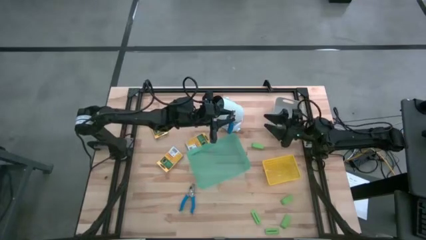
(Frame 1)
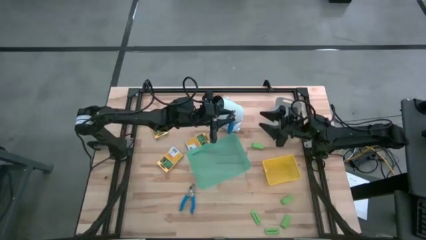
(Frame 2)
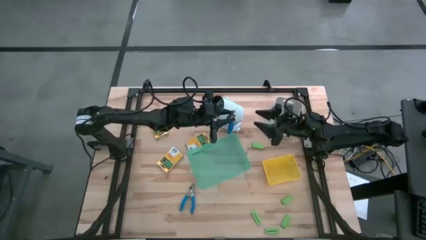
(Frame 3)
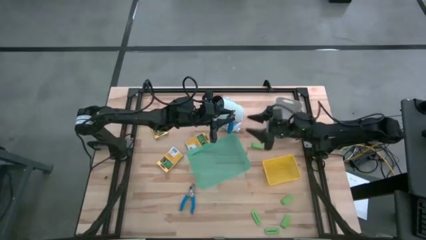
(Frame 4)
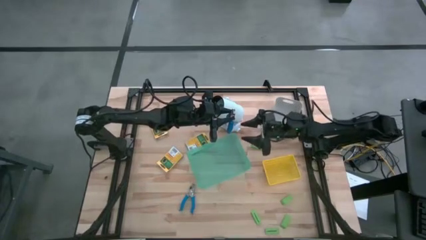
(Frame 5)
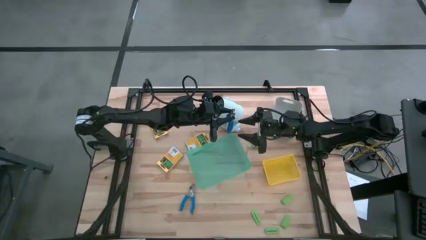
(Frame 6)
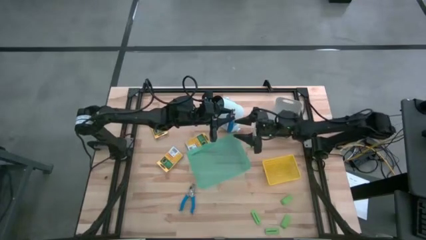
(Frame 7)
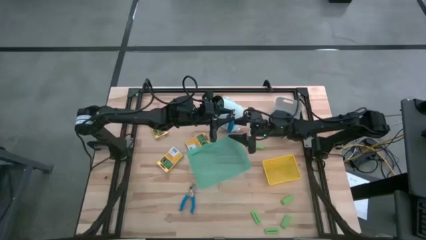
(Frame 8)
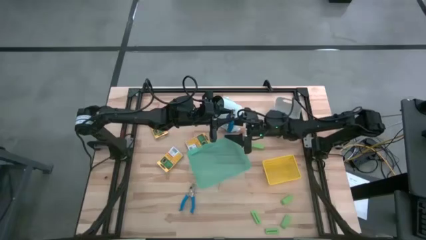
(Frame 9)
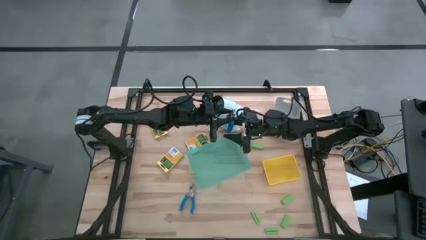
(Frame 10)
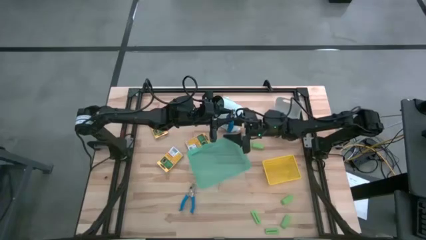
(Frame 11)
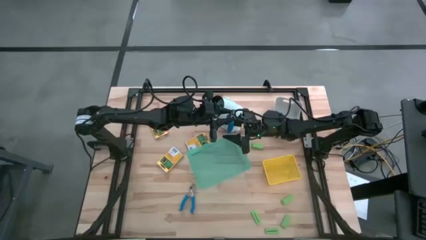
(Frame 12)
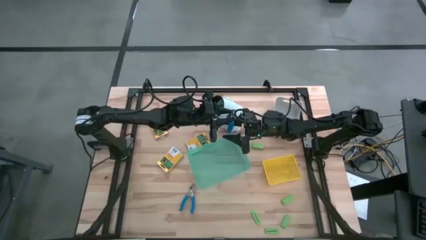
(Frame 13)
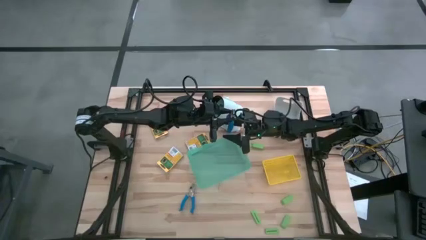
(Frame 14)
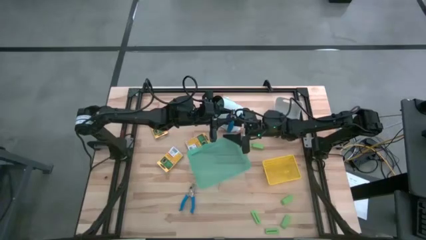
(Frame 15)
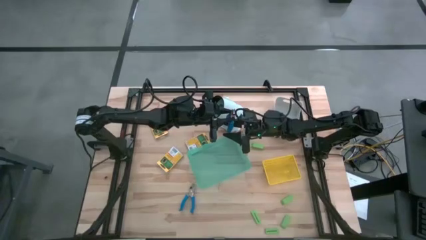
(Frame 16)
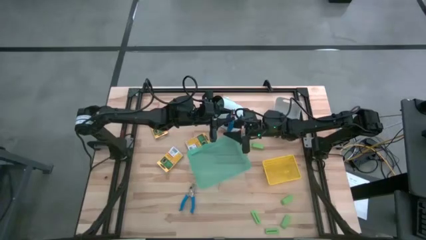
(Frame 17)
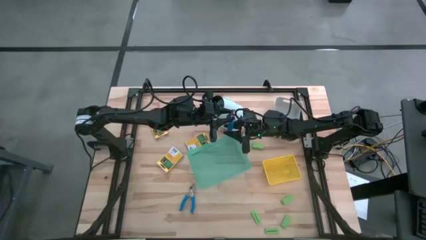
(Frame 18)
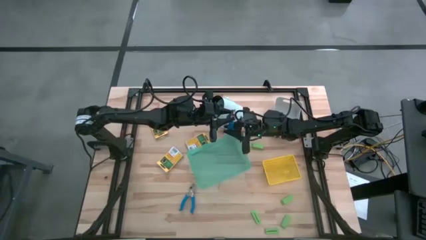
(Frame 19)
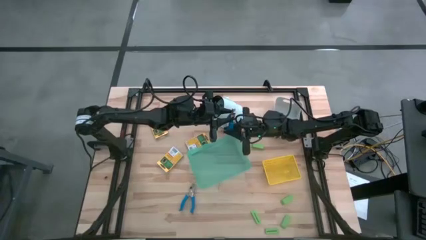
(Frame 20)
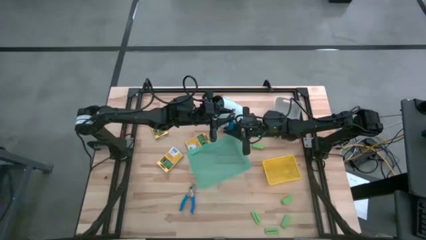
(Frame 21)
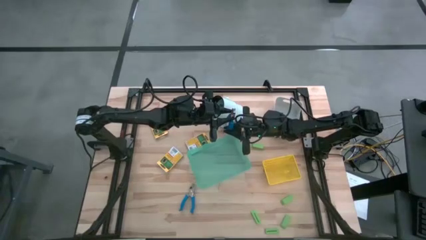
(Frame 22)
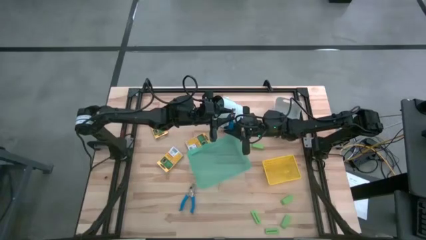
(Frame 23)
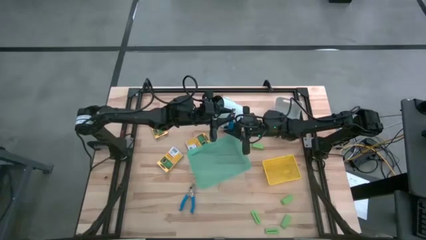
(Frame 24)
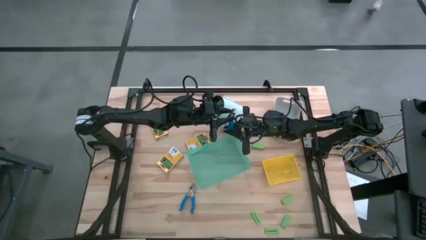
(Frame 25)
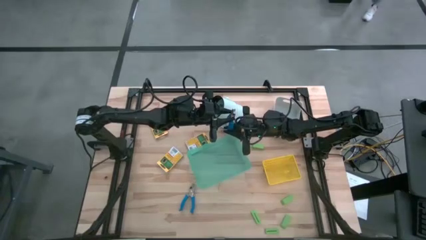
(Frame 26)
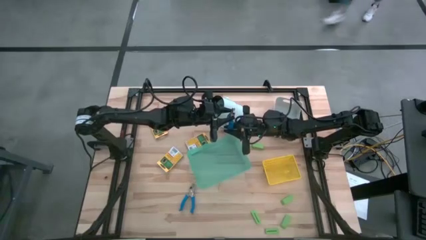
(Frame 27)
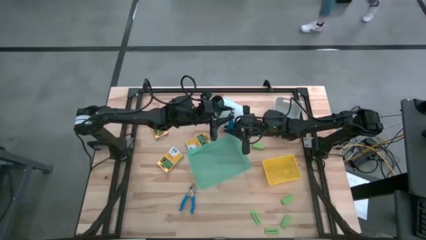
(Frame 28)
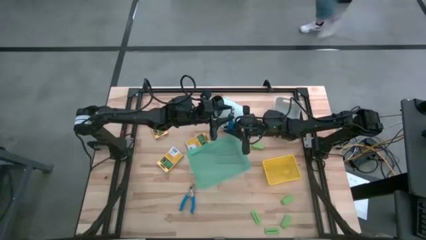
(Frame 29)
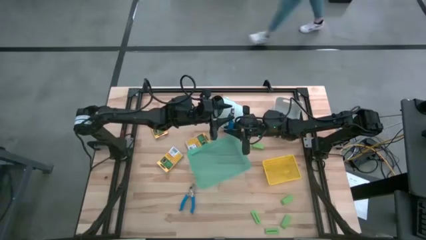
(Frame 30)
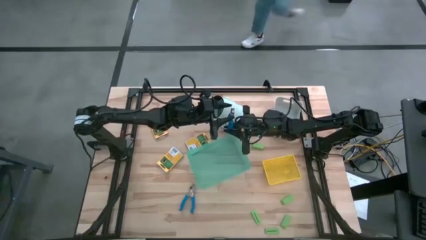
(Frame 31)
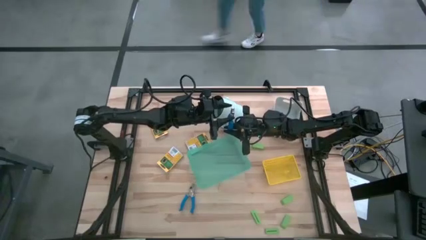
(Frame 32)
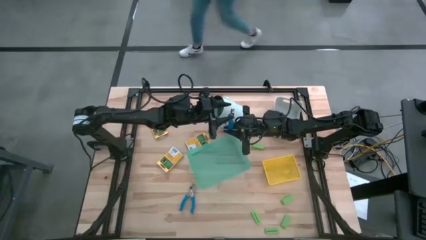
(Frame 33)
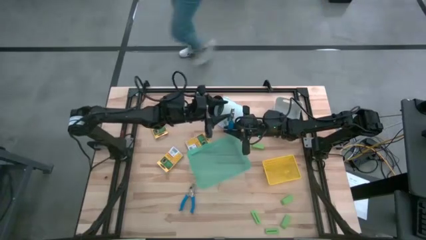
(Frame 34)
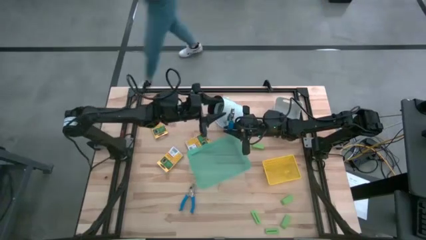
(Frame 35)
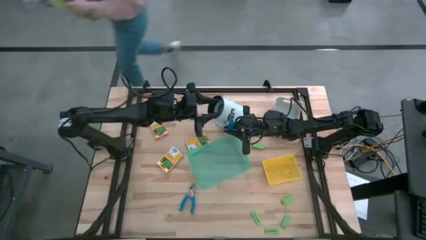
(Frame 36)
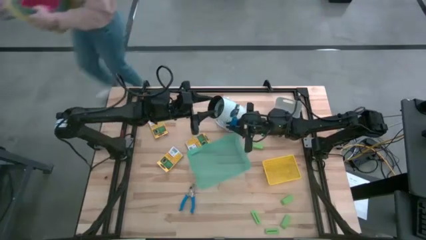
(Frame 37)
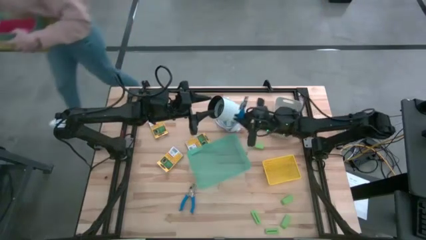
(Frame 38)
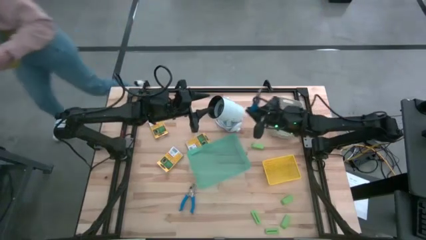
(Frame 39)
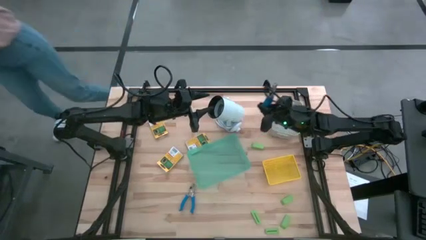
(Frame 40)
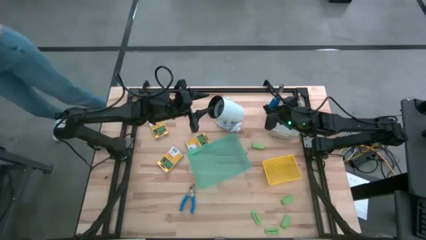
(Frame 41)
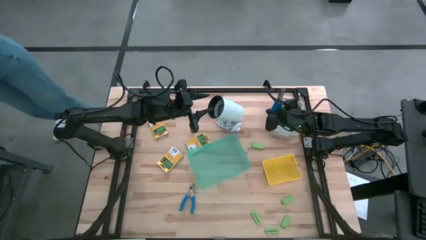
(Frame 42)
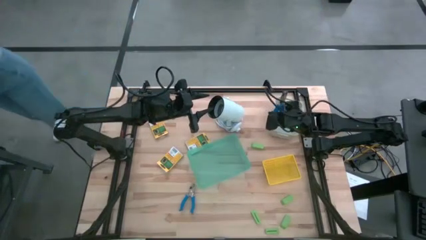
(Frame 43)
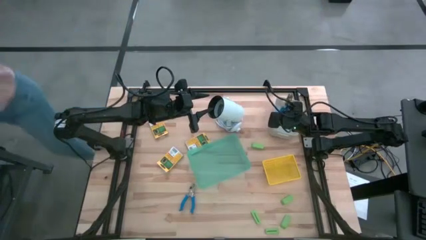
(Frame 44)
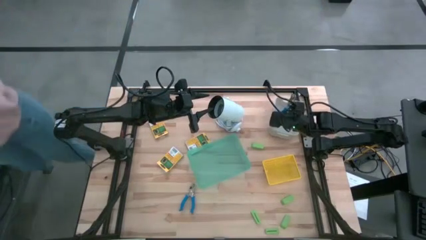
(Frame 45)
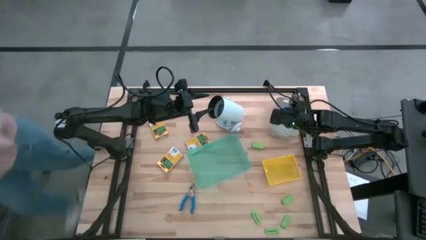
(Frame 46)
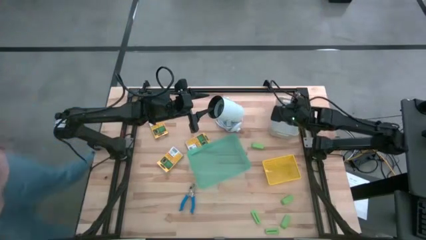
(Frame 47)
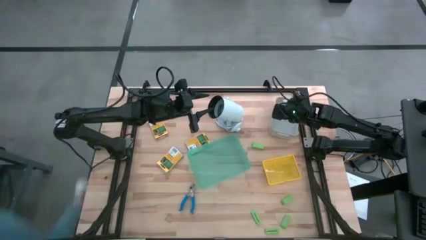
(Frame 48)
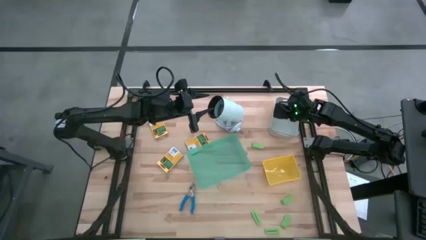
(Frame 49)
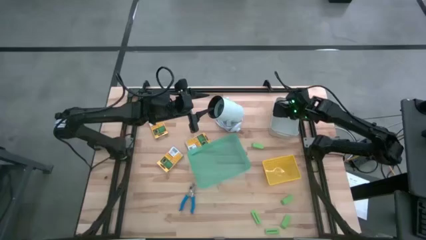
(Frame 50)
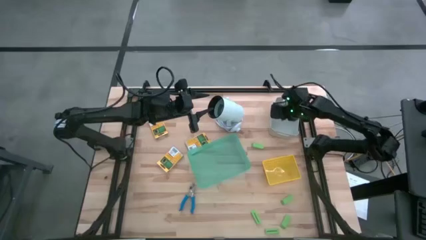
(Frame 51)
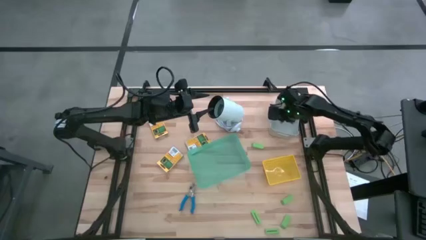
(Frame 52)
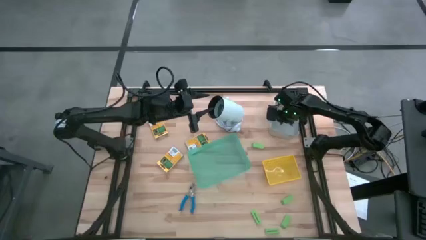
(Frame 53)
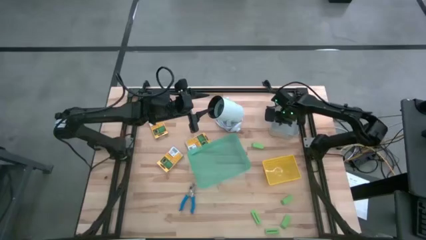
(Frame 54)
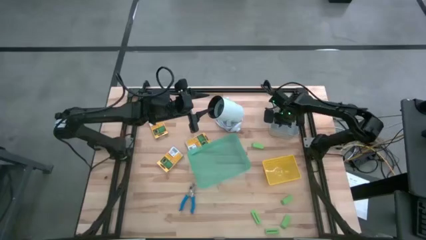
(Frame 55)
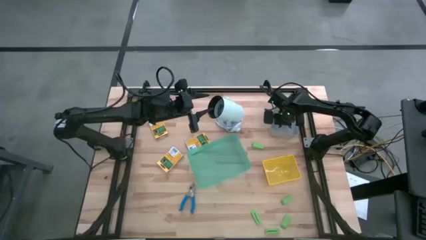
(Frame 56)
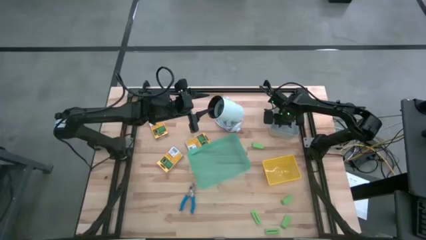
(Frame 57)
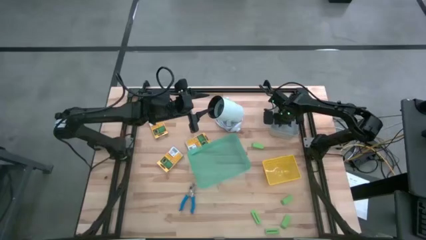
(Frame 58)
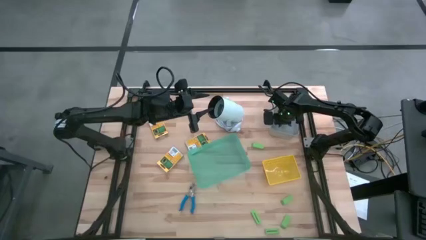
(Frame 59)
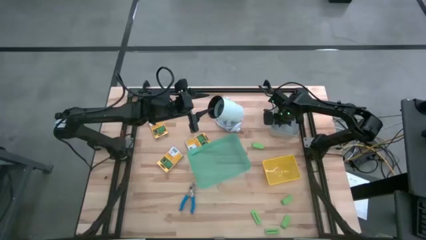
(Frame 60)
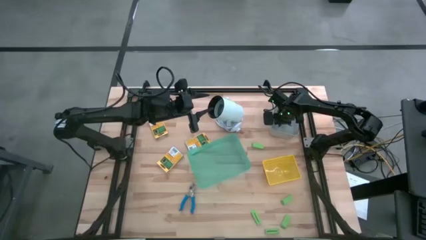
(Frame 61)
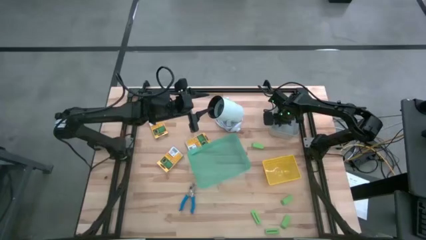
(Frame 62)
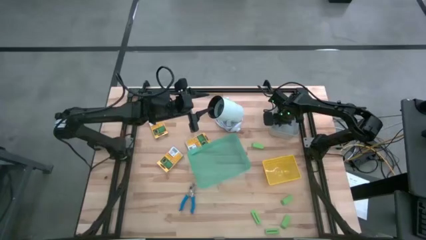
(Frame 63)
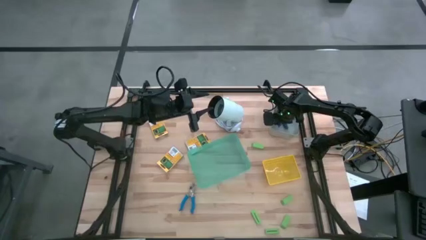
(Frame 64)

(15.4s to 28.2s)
Task: Pick & Place School Supplies
Put the blue plier into the gray bin
